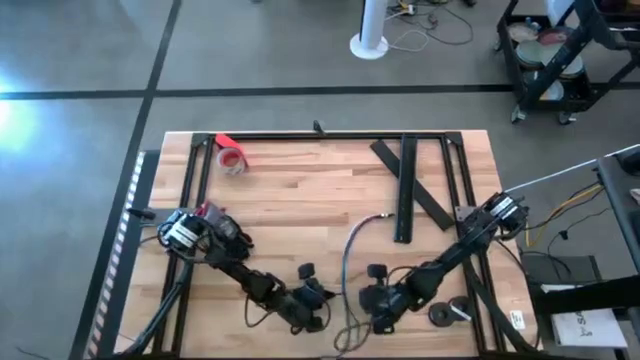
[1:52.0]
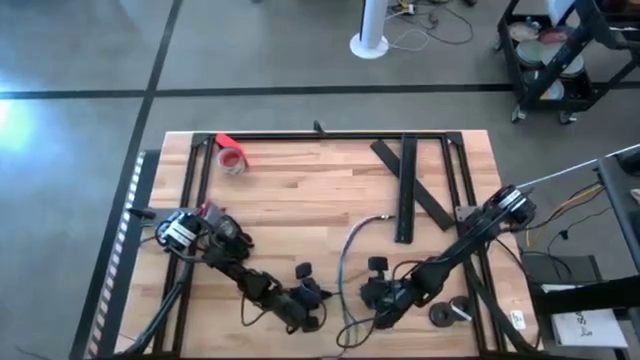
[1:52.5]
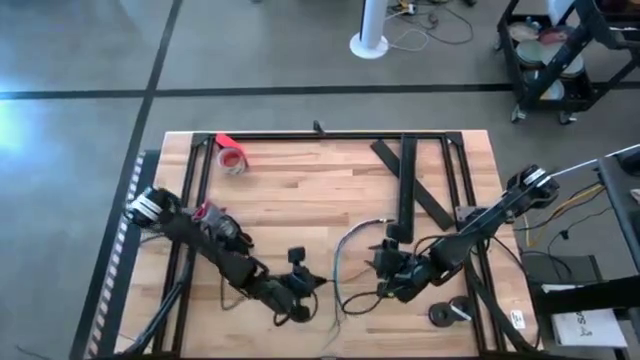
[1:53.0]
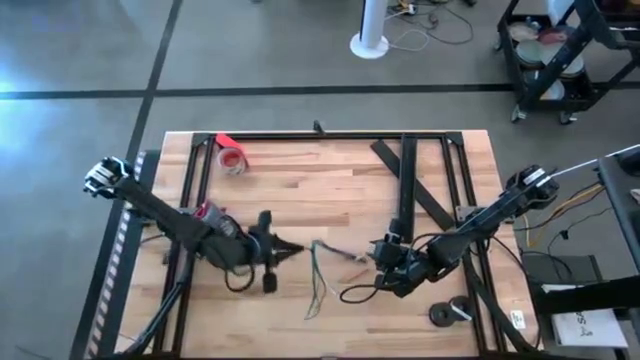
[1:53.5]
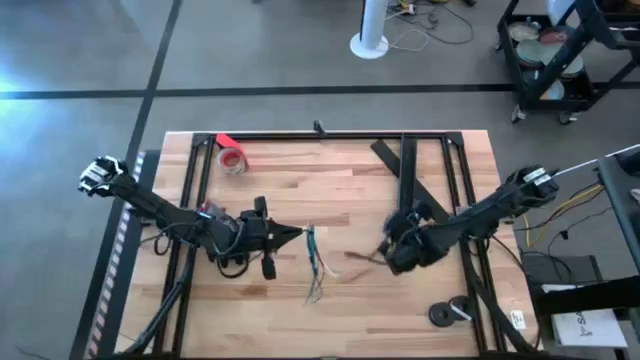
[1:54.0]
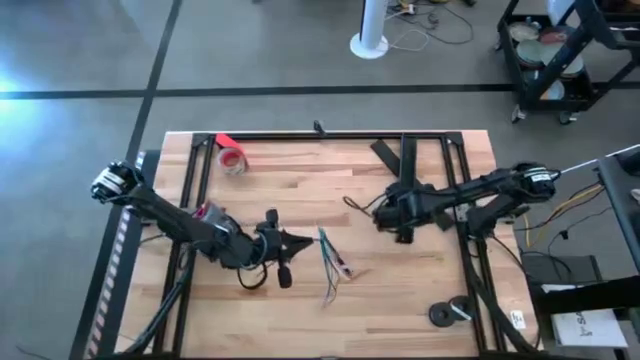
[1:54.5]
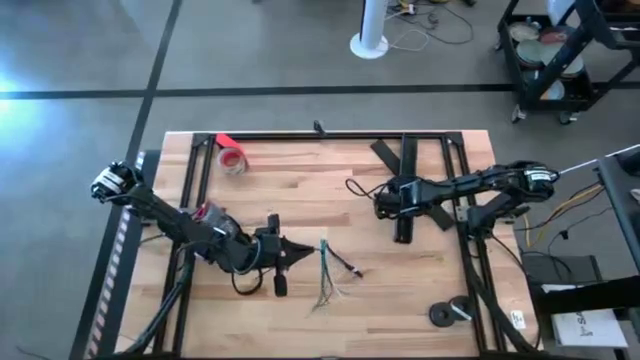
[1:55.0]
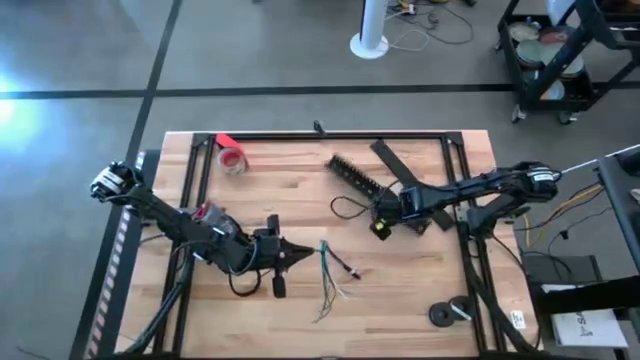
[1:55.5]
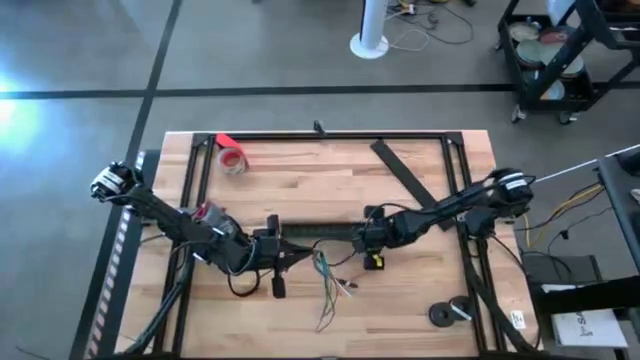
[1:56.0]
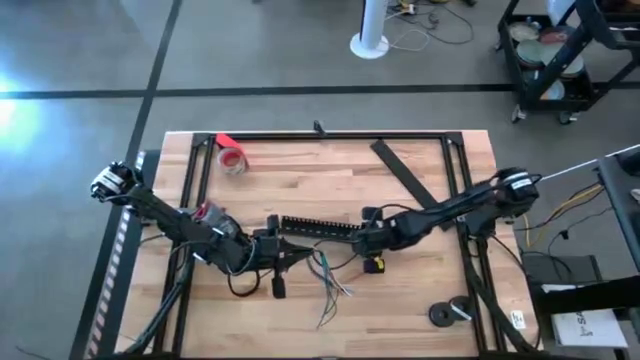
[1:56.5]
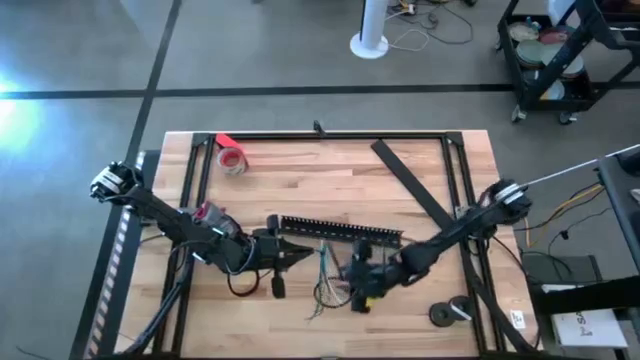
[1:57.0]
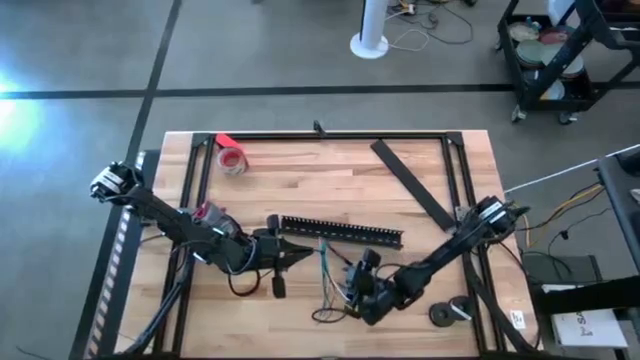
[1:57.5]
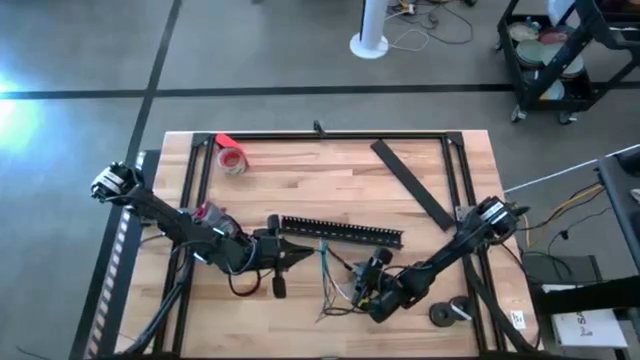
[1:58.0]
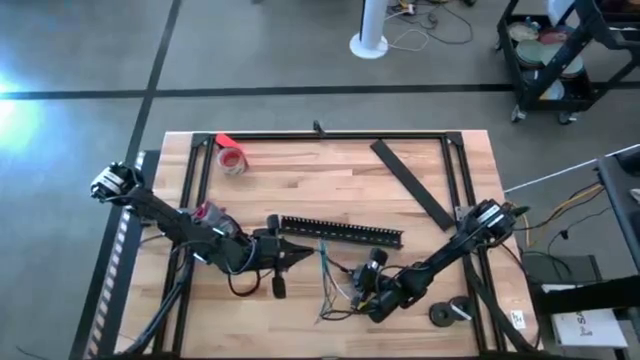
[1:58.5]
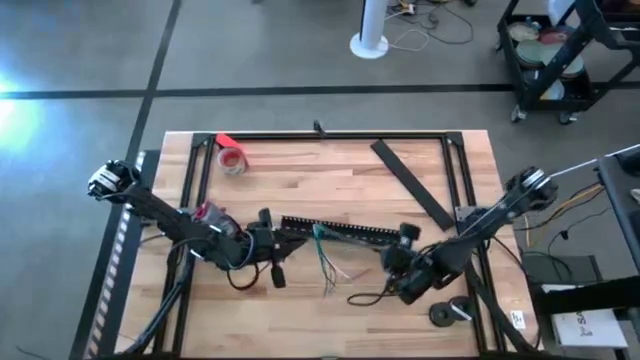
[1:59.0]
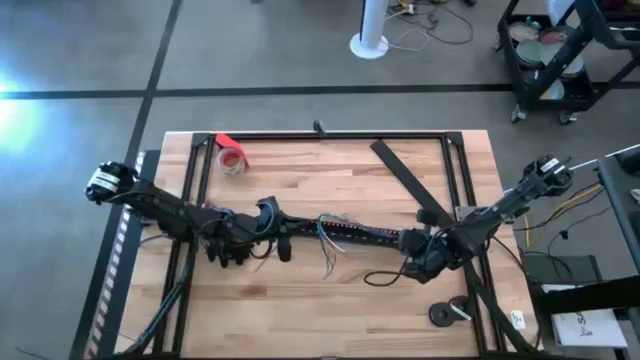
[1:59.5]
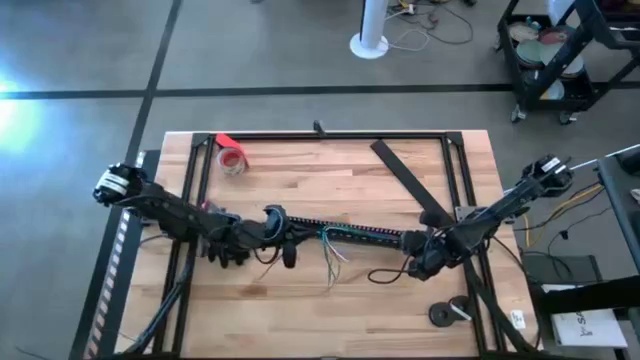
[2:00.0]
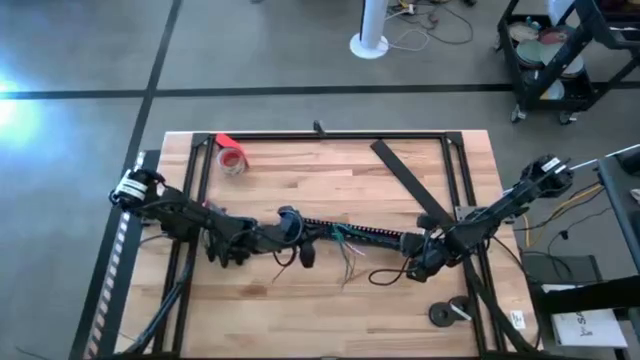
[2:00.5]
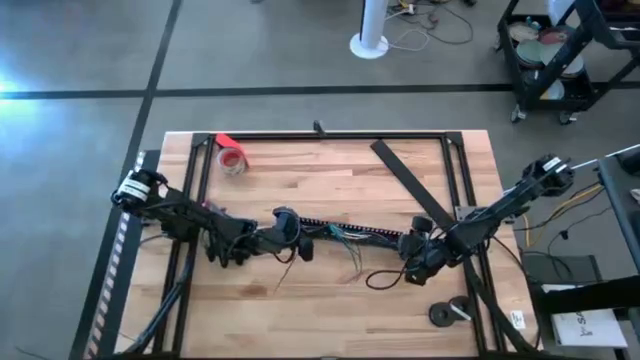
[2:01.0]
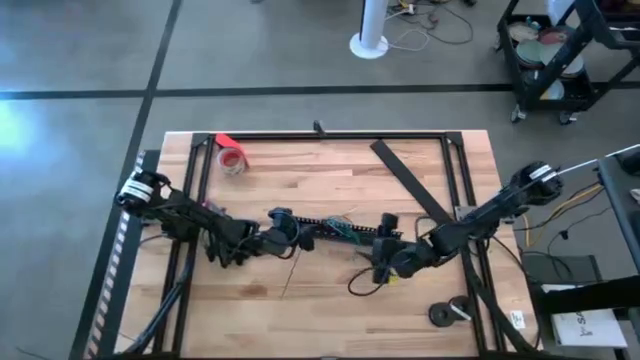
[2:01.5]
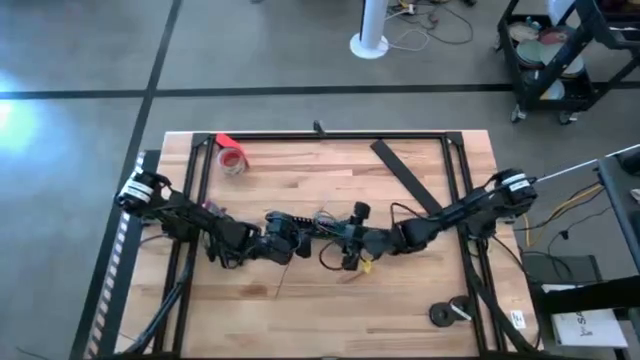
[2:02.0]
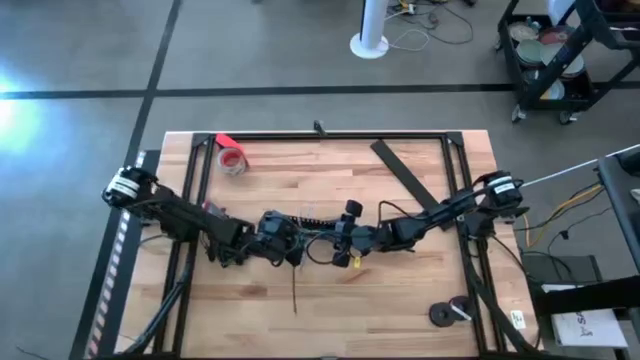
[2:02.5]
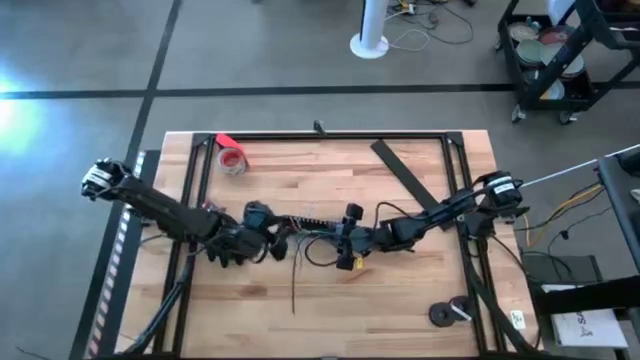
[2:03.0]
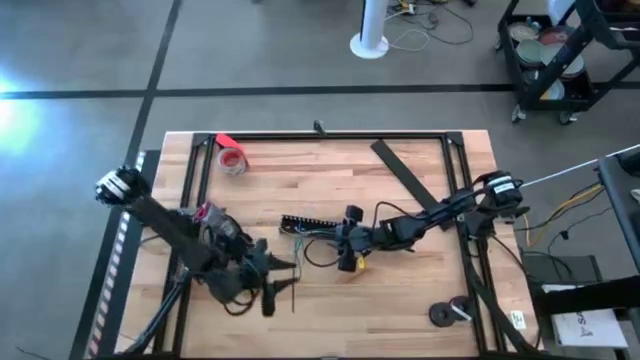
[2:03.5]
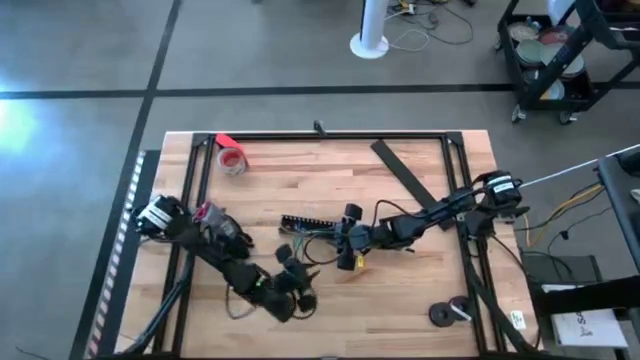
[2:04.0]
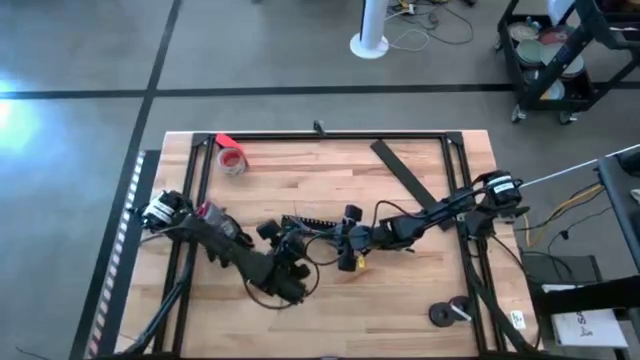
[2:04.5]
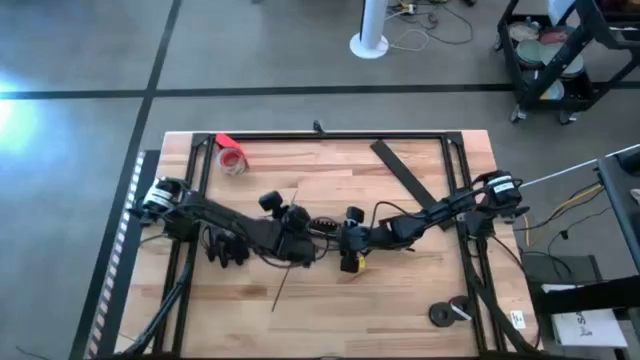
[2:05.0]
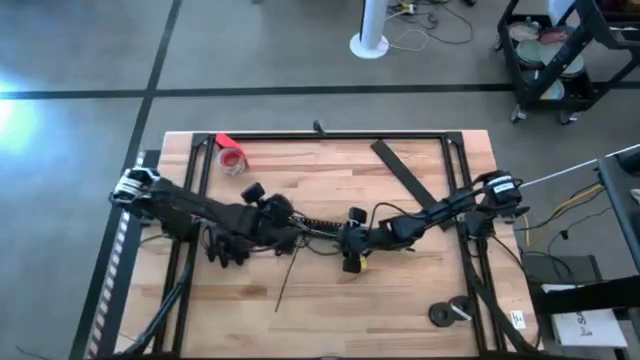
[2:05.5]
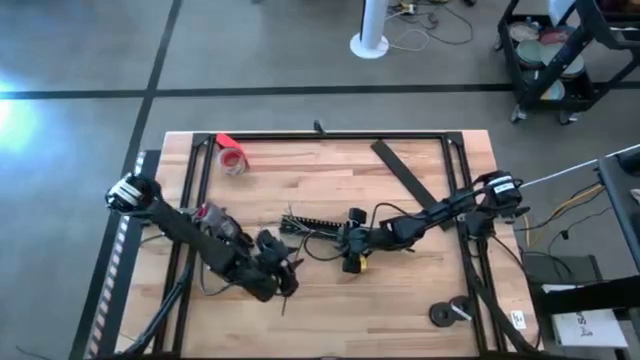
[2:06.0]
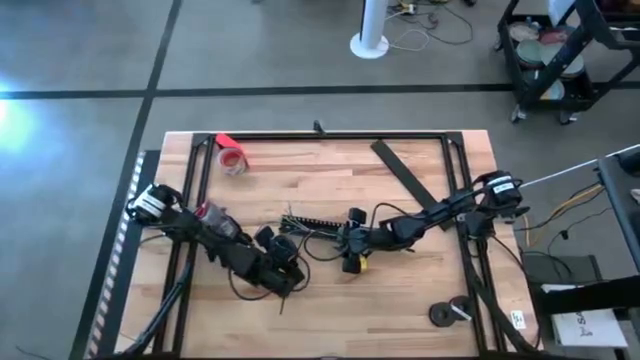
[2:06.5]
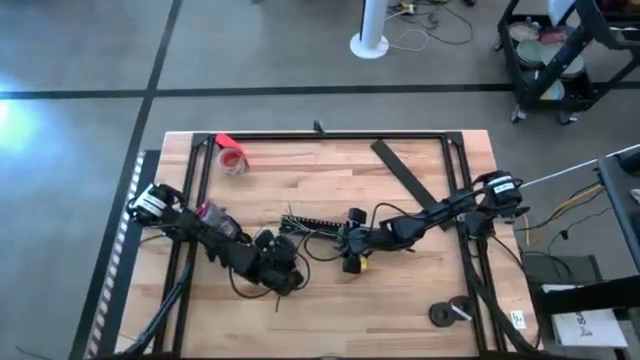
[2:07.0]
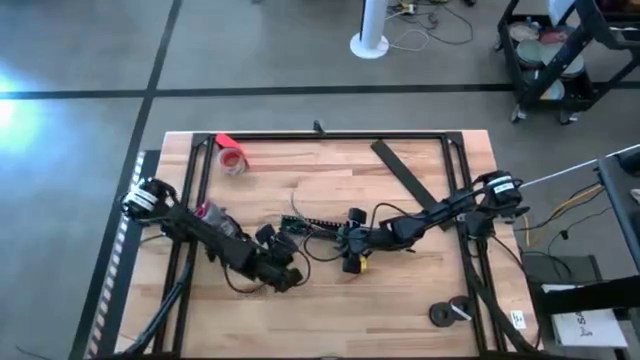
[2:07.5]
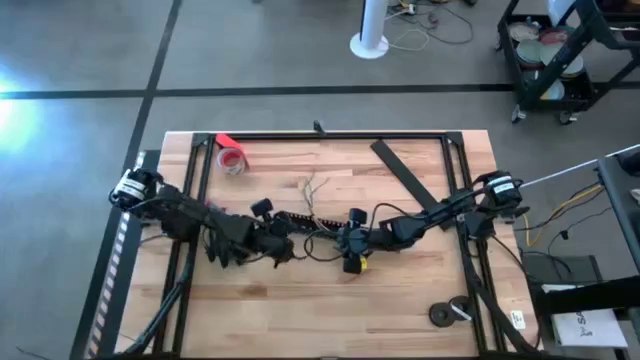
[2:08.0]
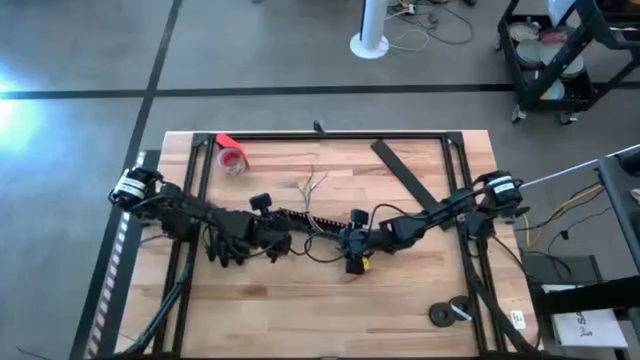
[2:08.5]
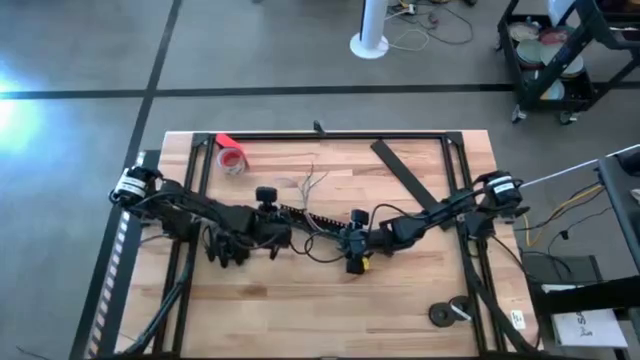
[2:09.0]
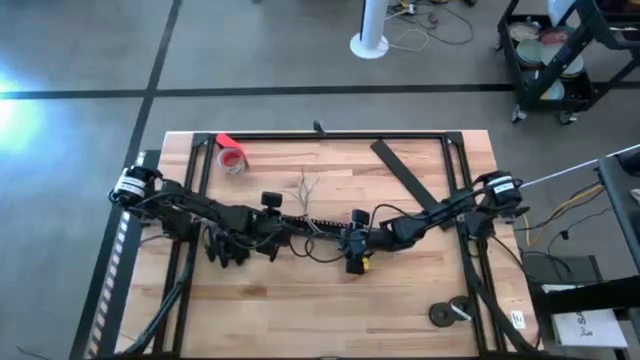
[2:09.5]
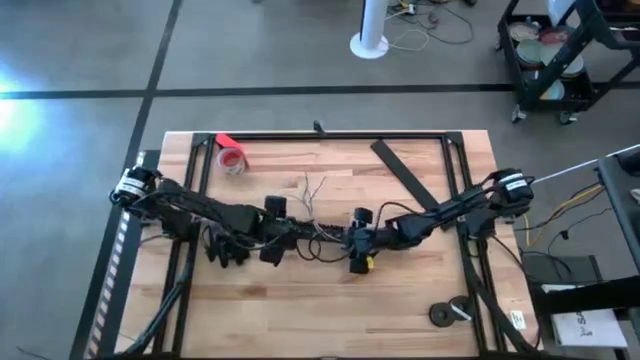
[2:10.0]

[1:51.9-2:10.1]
Task: Ziptie cables
Put the zip-tied cables into the black cable duct

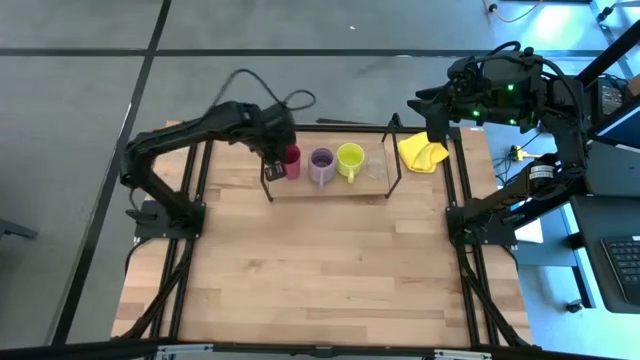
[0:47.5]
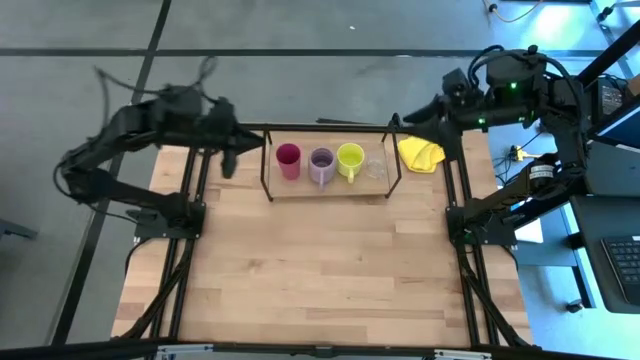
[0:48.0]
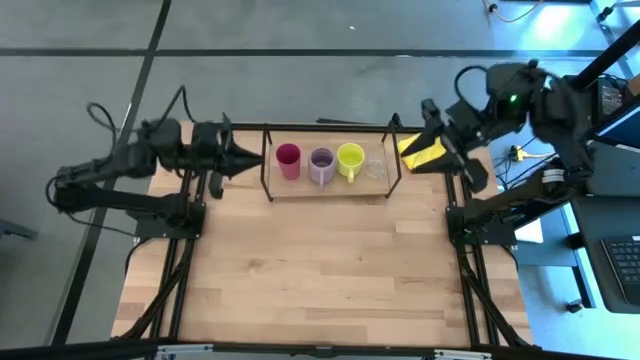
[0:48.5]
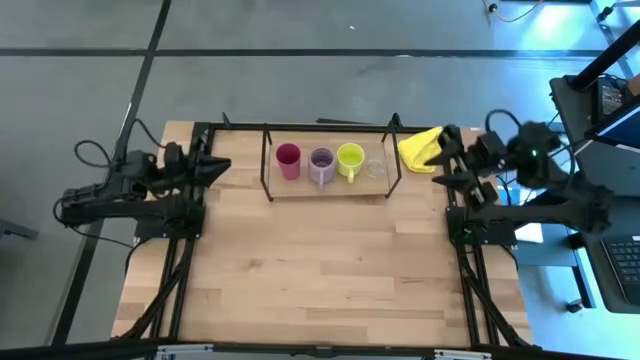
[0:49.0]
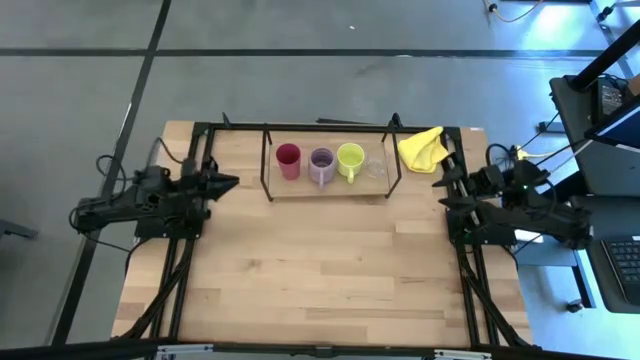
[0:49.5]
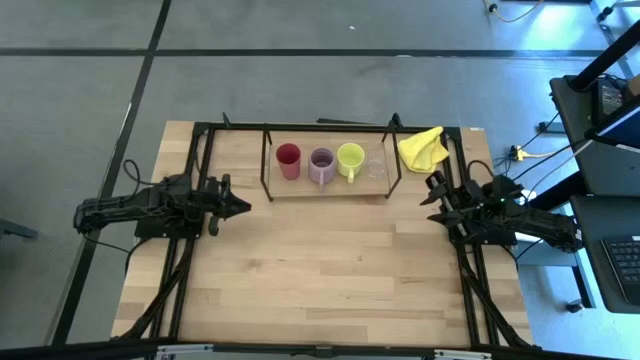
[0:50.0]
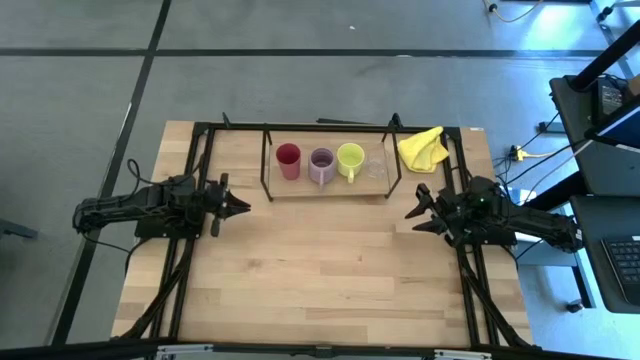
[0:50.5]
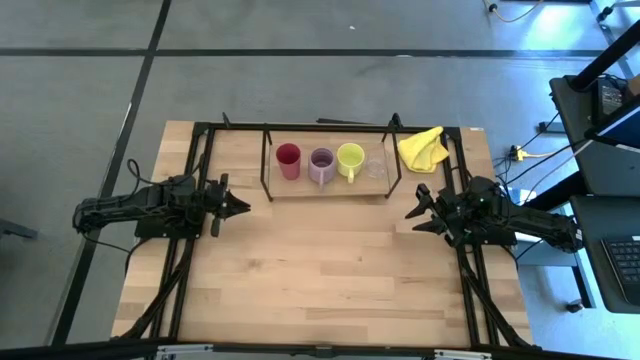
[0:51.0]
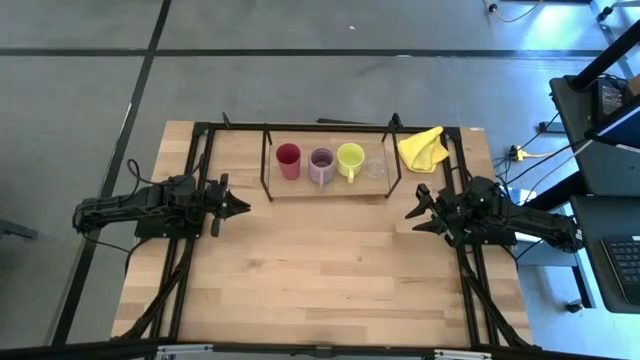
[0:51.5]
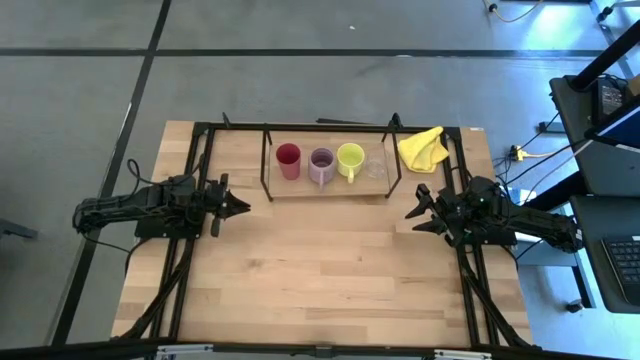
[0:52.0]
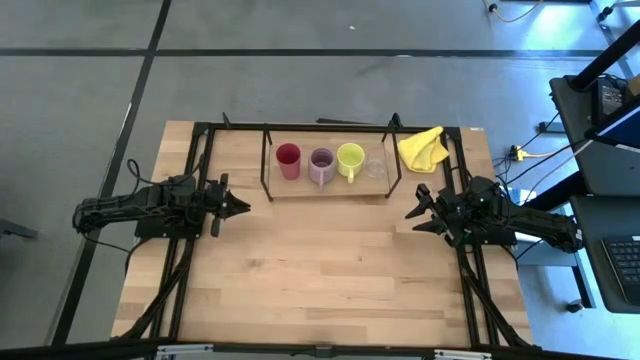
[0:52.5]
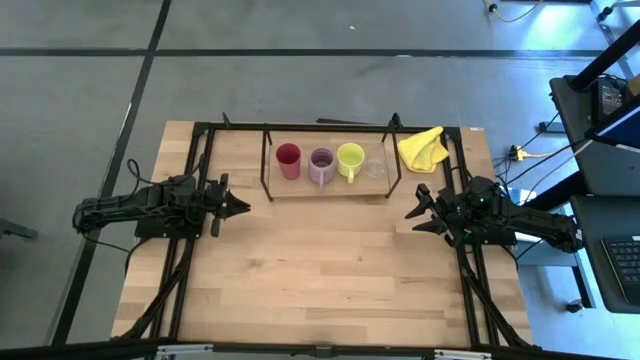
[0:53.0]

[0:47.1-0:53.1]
Task: Stack small to large cups/mugs on shelf
Return to Home Position
